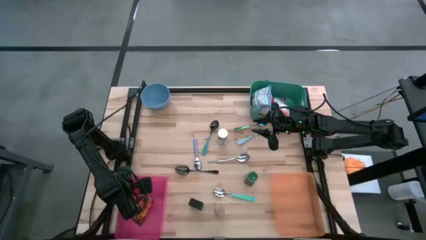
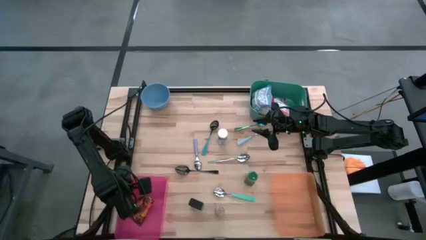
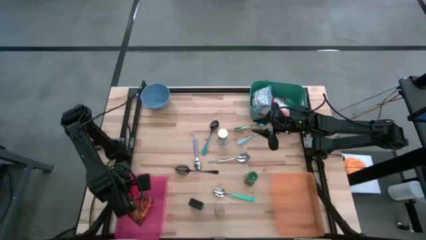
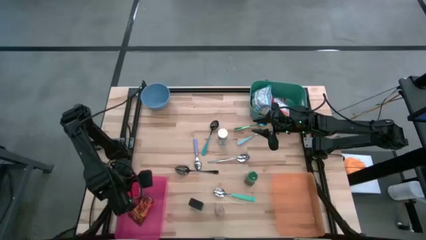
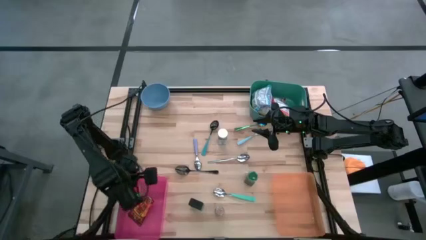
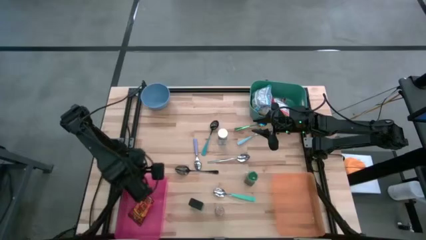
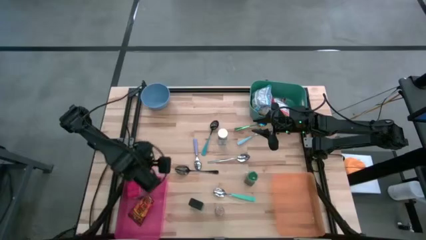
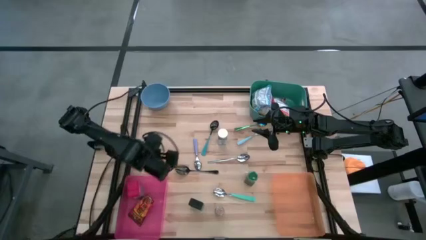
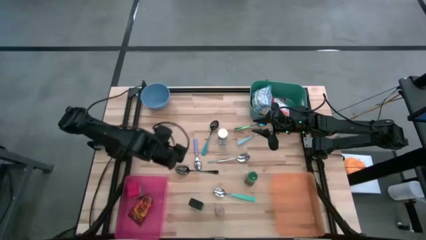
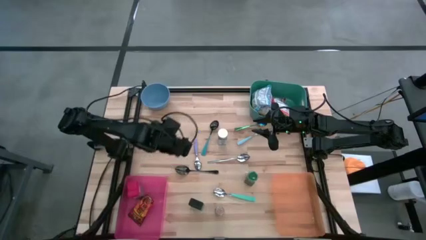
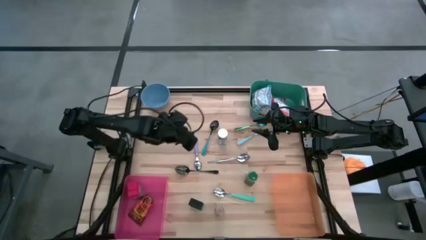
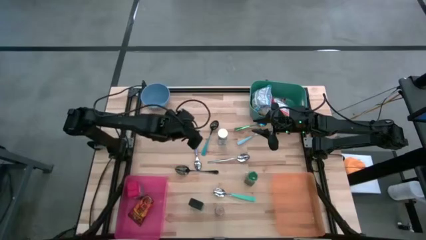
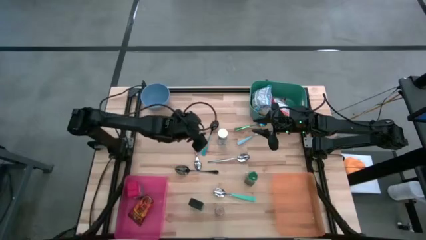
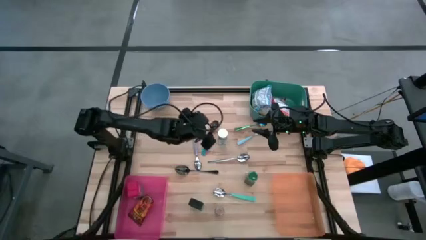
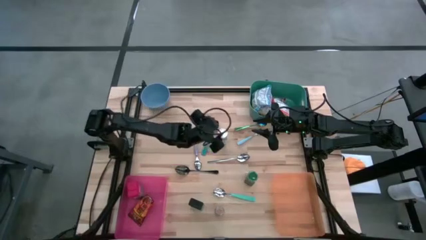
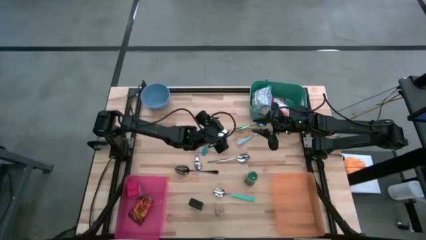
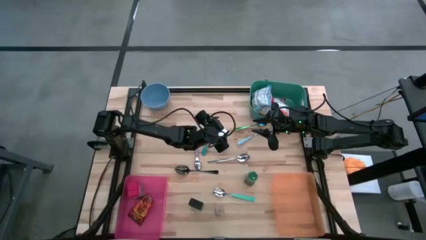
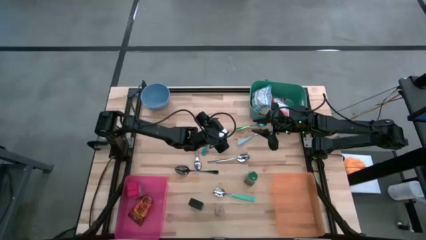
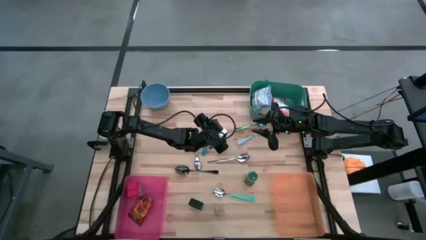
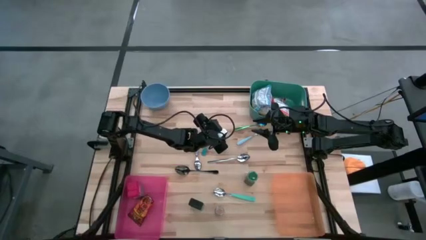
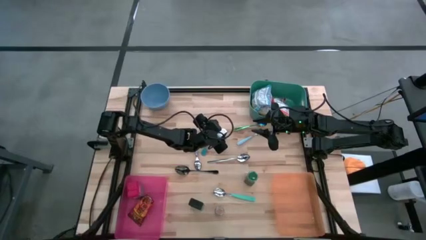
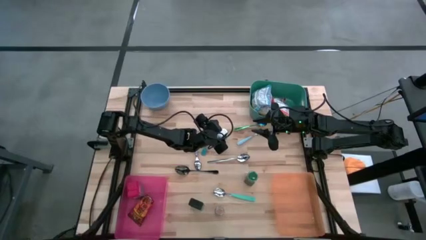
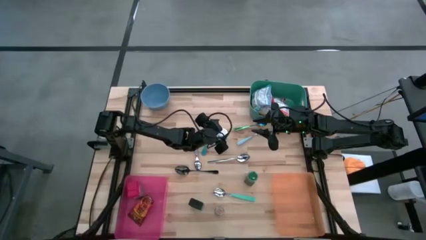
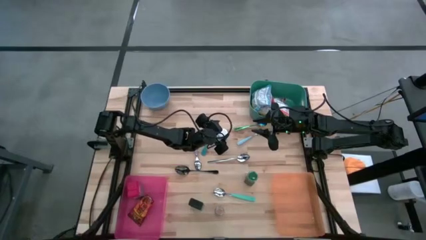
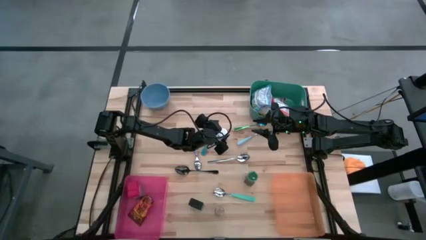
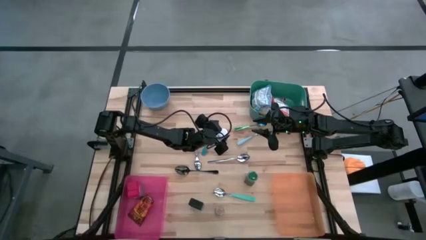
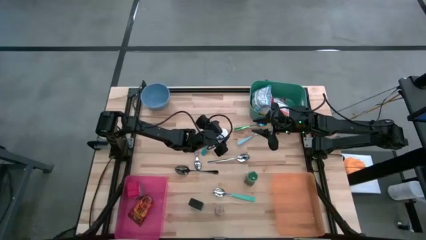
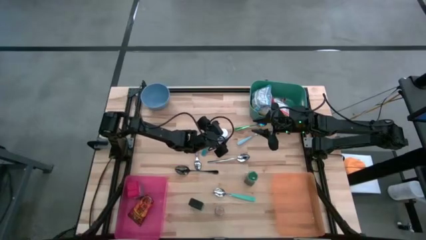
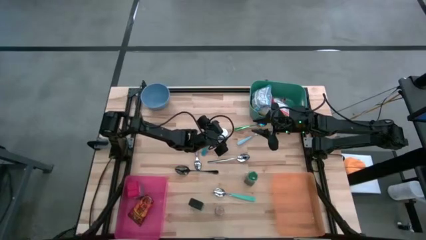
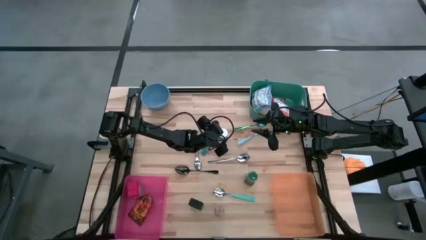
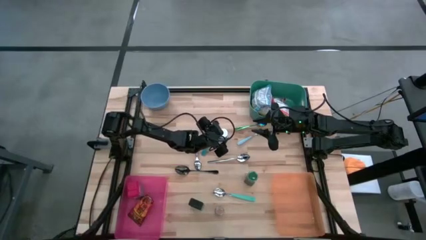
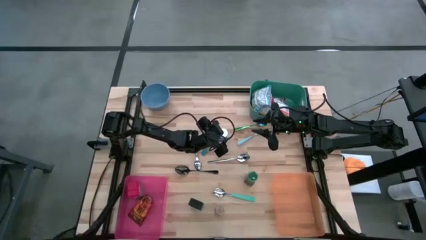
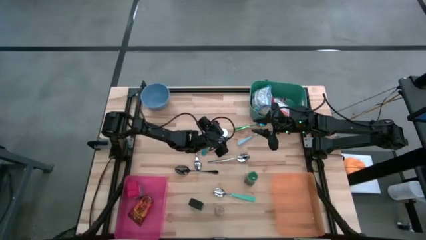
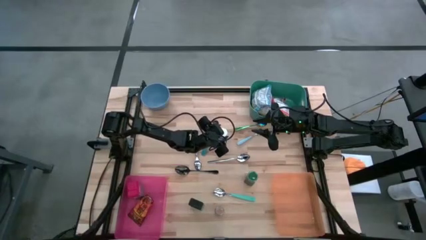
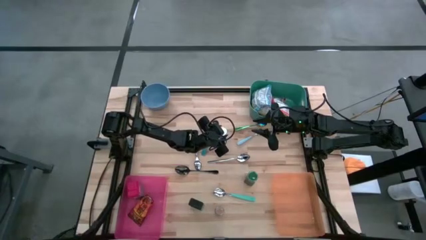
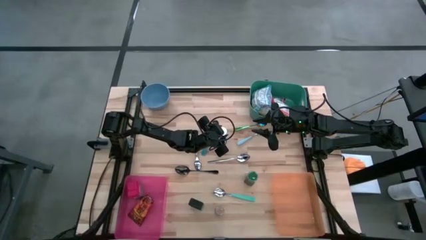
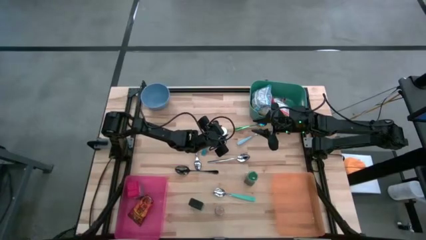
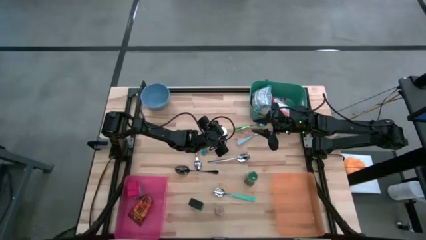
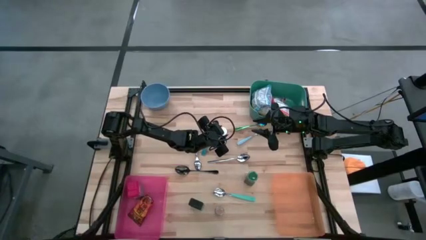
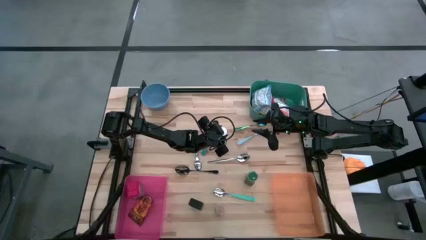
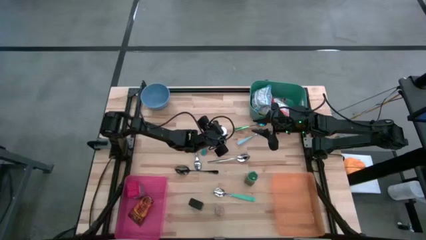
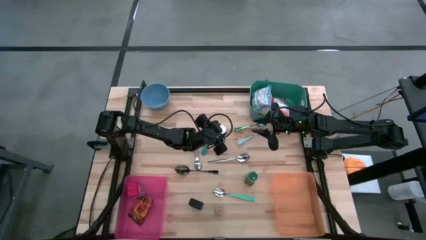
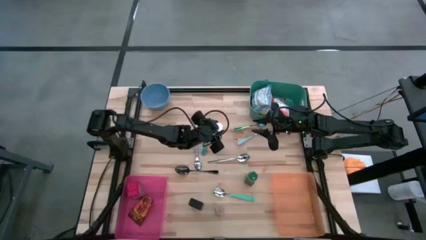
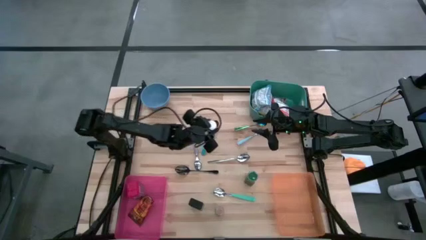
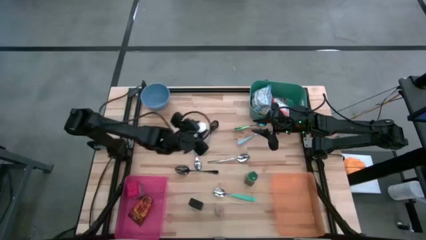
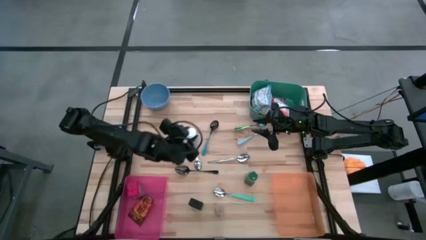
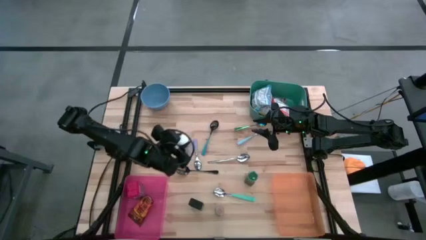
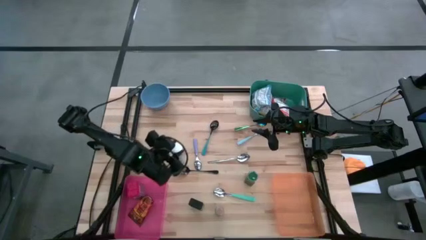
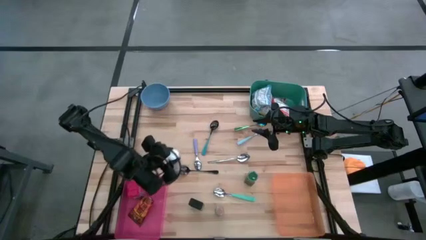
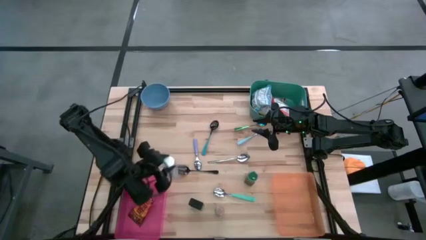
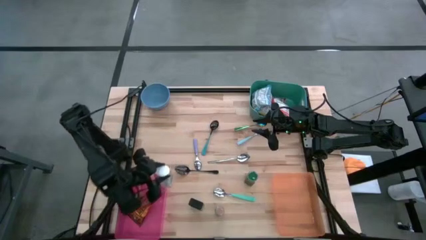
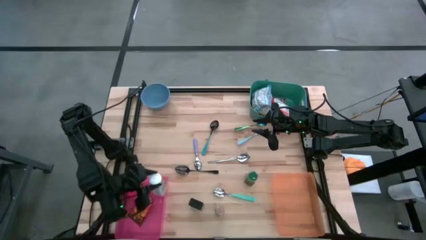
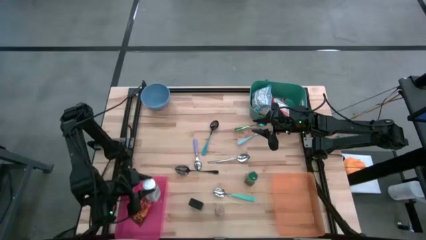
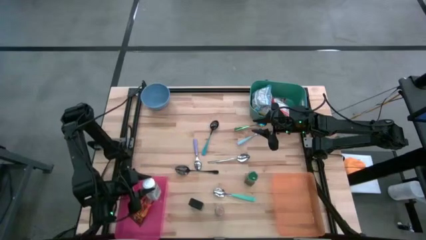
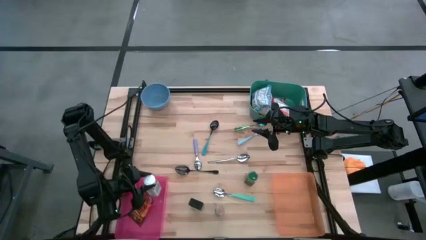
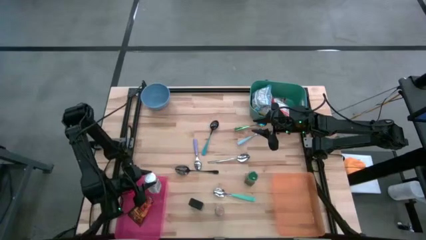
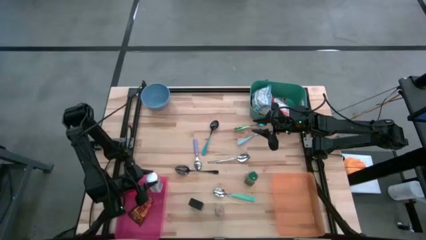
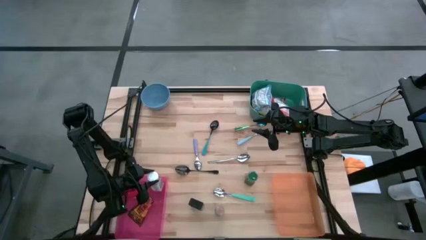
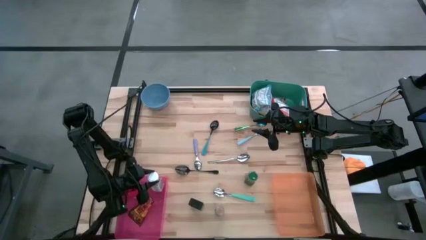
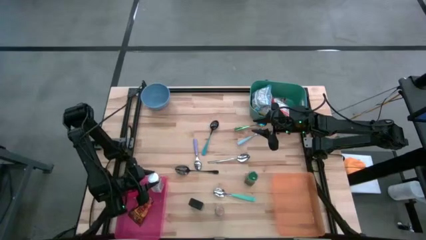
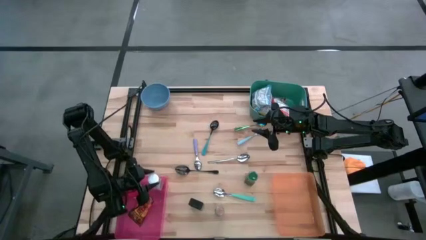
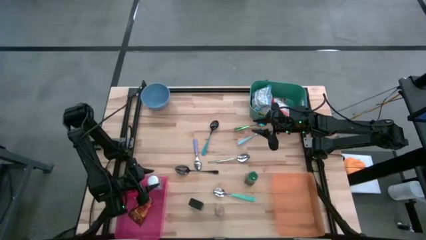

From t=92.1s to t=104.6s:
Put the white seasoning bottle into the pink bin

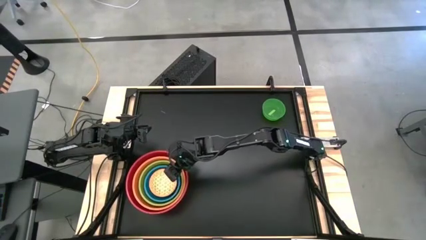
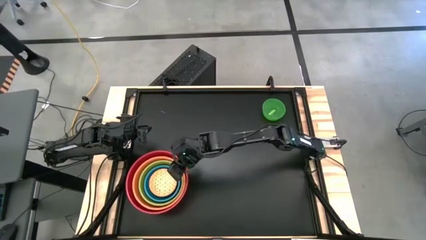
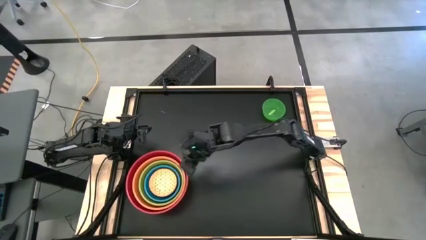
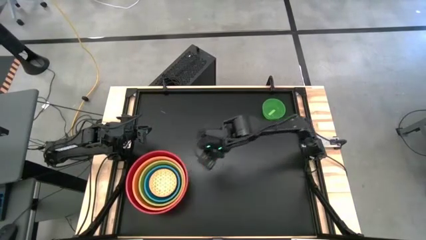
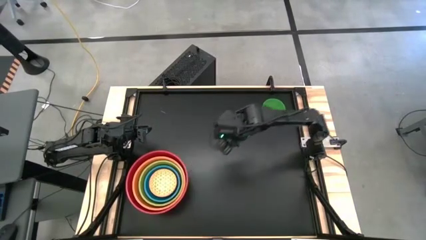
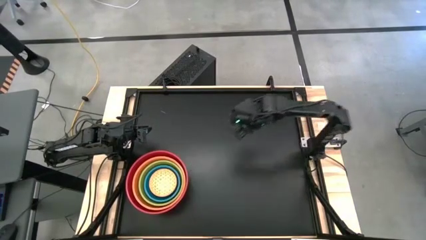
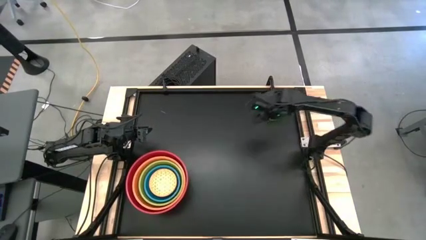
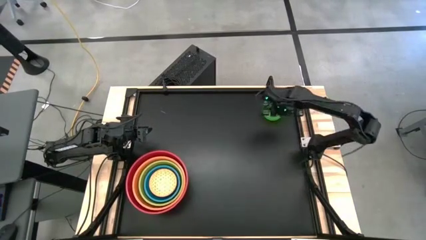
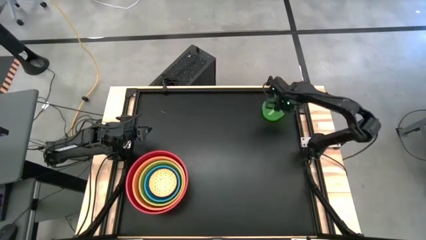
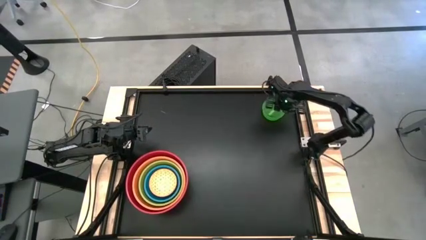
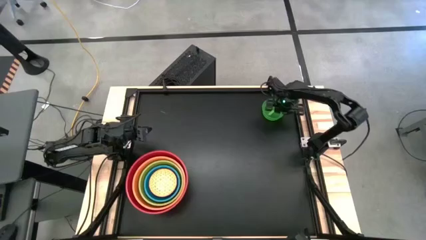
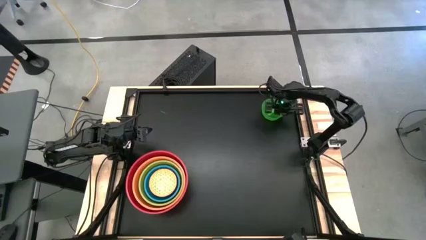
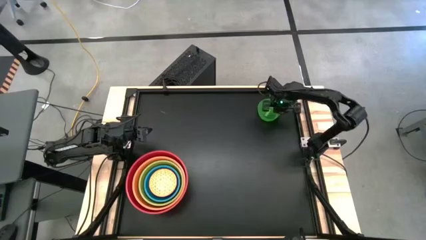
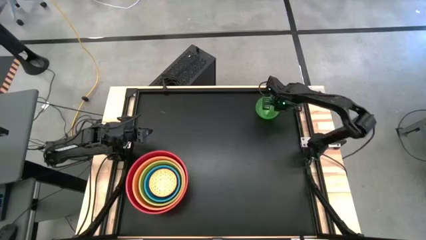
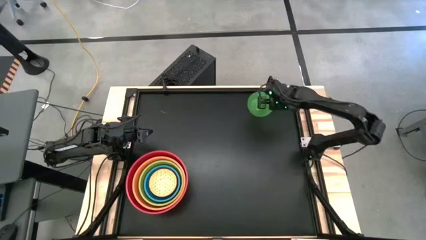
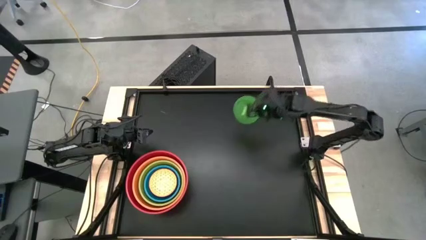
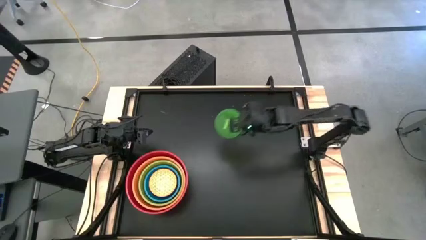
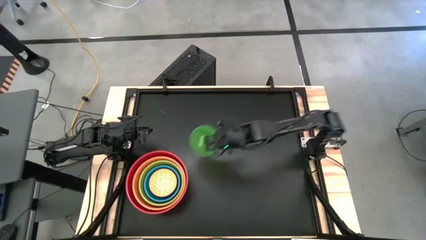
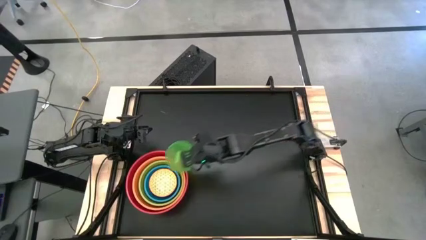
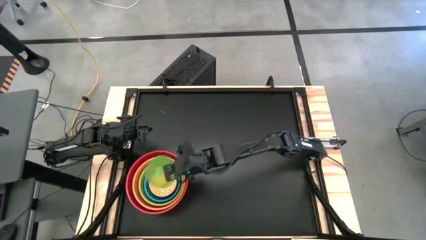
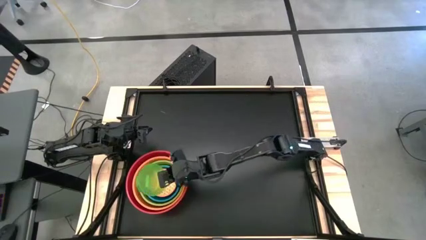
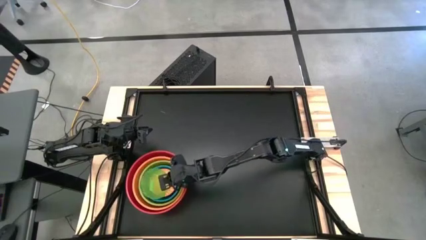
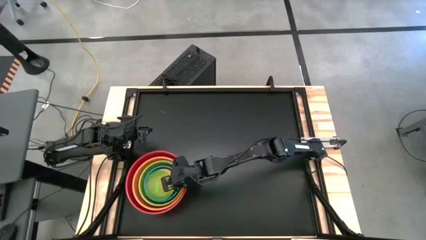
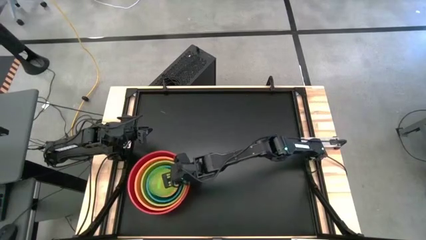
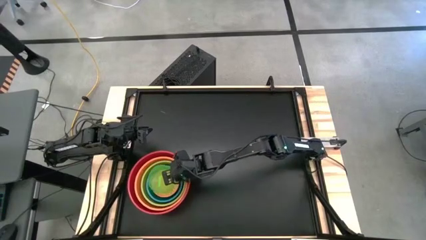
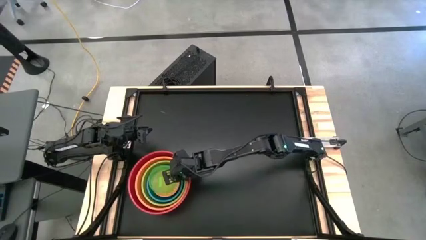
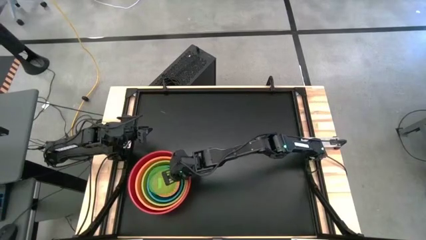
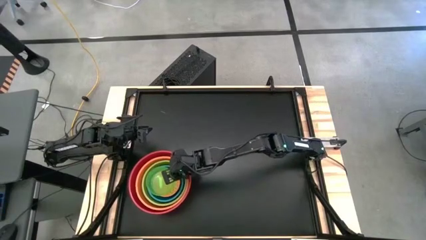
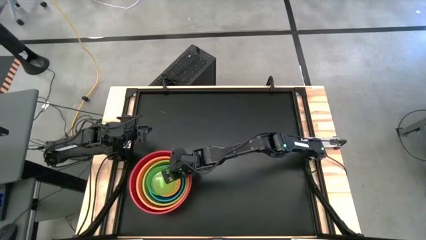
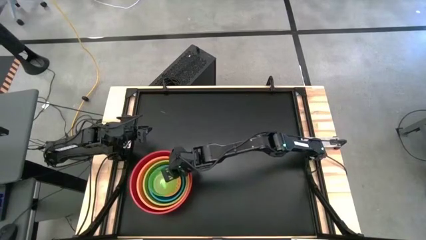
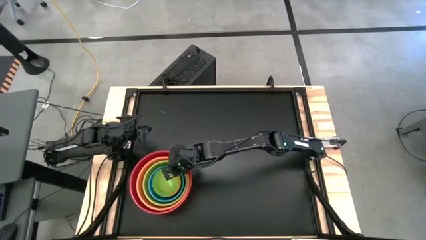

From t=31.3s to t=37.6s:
Stack the green bowl on top of the orange patterned bowl
